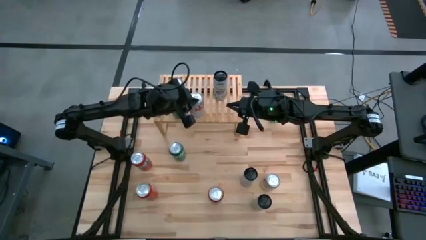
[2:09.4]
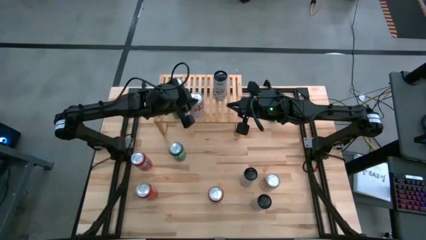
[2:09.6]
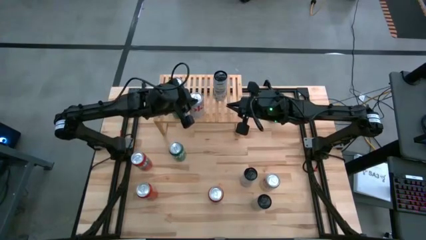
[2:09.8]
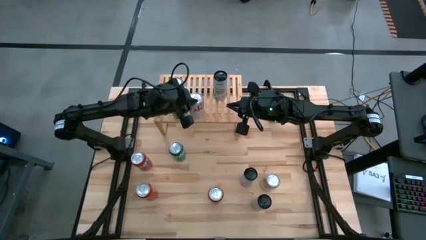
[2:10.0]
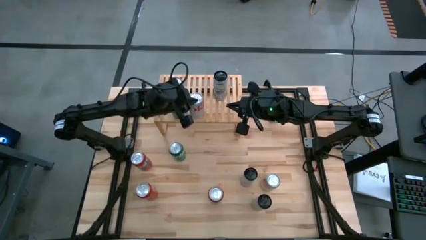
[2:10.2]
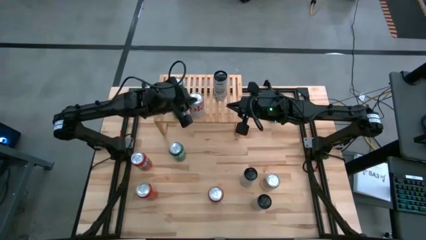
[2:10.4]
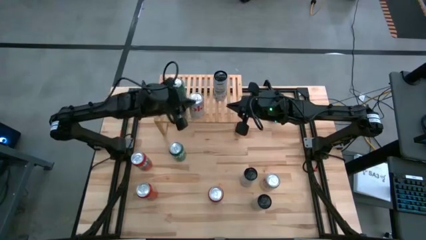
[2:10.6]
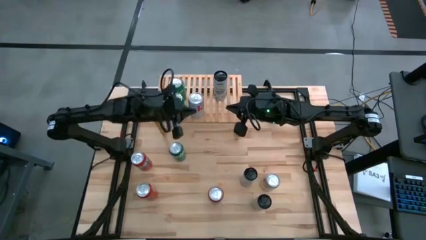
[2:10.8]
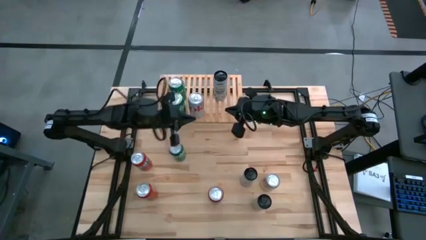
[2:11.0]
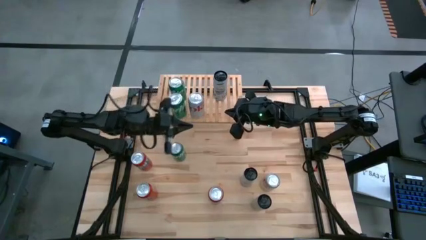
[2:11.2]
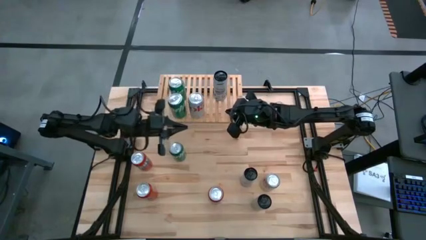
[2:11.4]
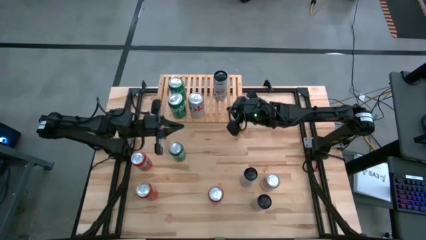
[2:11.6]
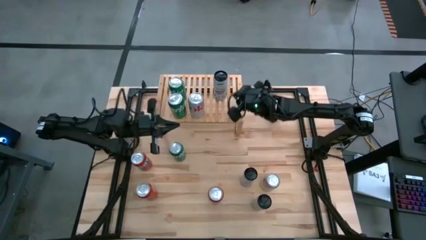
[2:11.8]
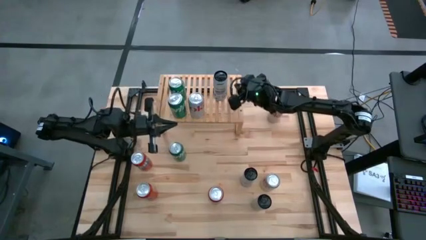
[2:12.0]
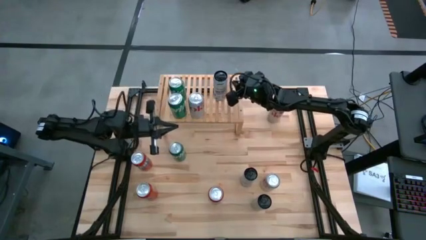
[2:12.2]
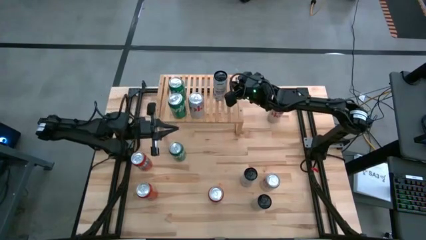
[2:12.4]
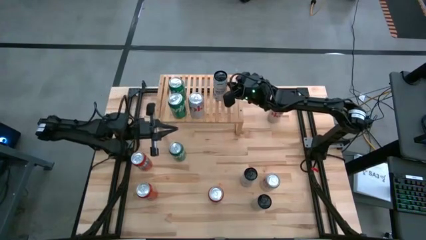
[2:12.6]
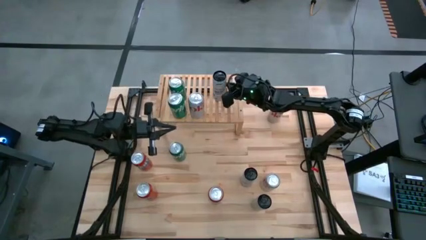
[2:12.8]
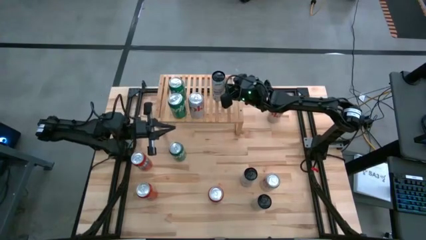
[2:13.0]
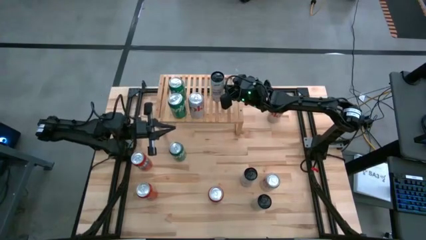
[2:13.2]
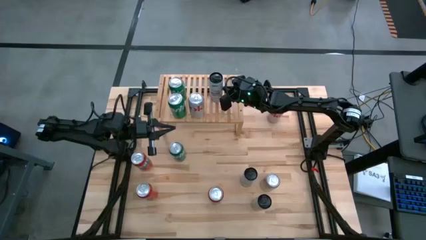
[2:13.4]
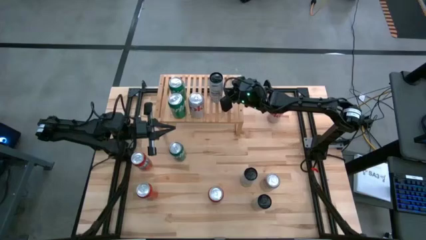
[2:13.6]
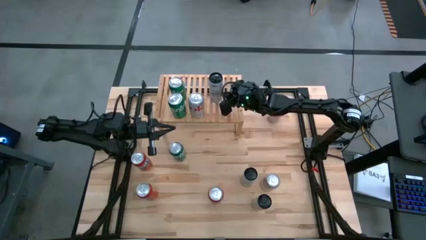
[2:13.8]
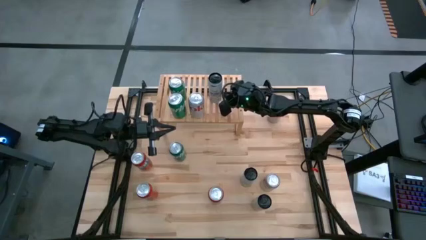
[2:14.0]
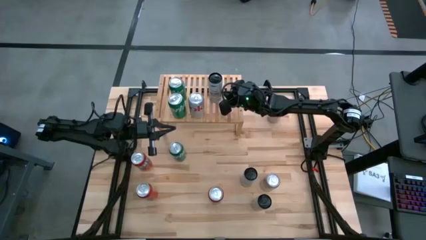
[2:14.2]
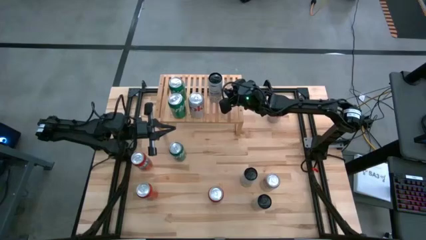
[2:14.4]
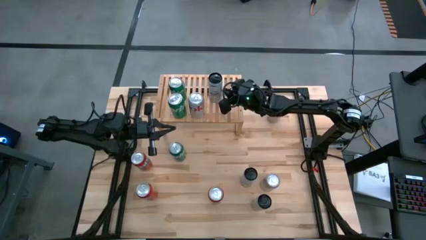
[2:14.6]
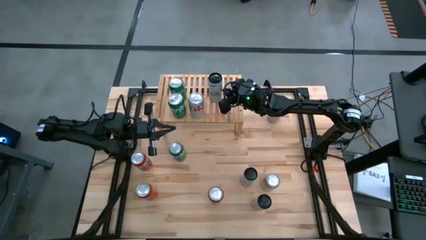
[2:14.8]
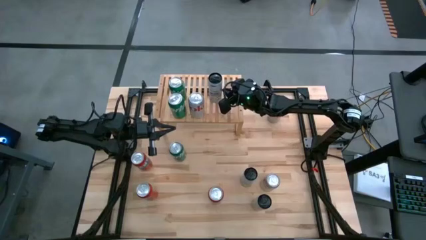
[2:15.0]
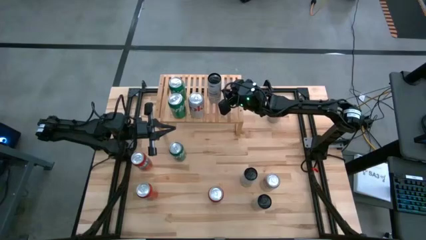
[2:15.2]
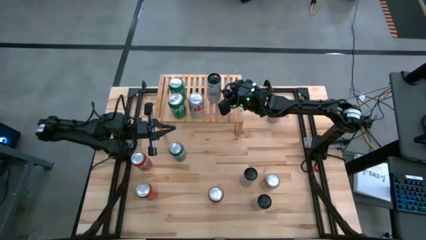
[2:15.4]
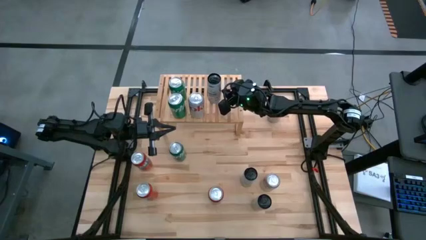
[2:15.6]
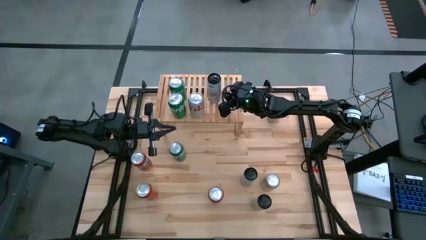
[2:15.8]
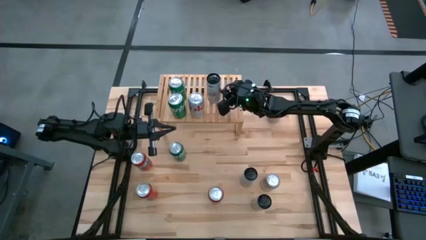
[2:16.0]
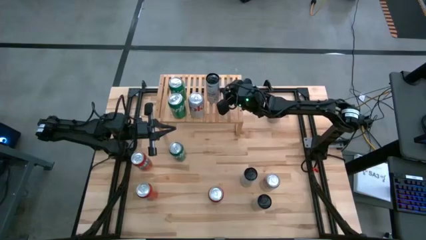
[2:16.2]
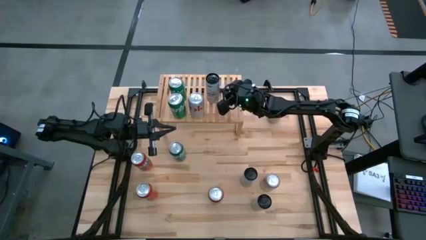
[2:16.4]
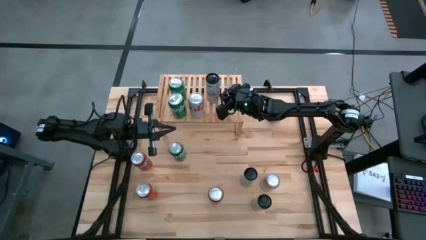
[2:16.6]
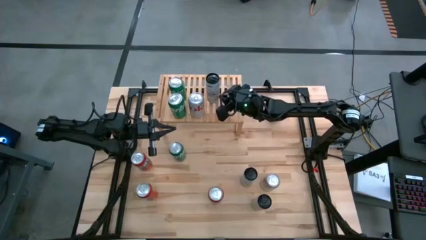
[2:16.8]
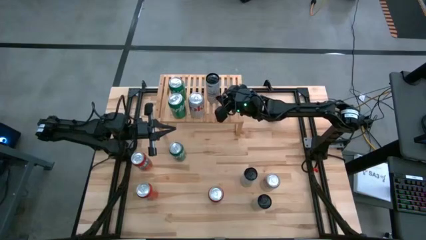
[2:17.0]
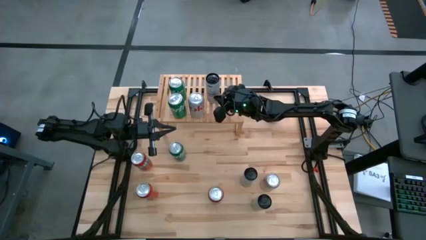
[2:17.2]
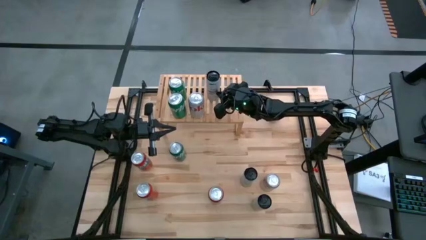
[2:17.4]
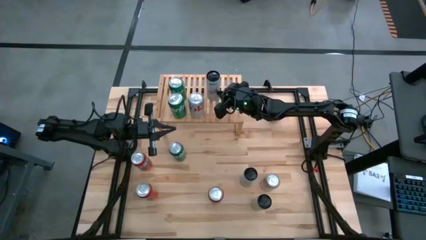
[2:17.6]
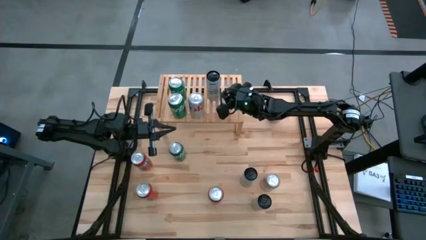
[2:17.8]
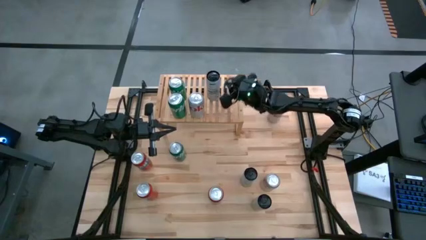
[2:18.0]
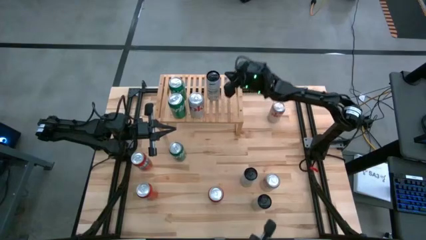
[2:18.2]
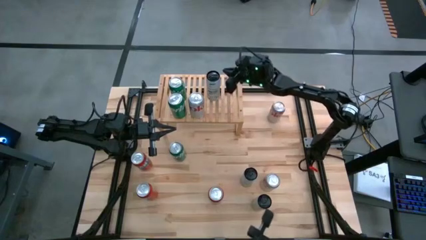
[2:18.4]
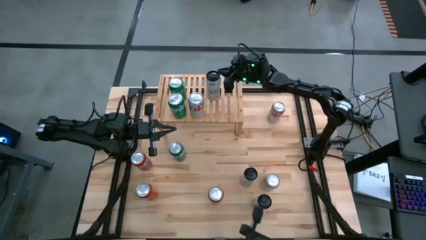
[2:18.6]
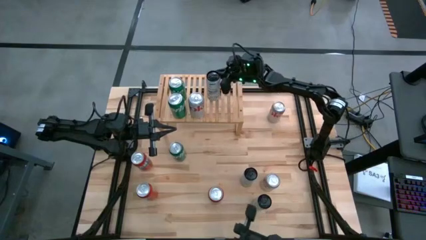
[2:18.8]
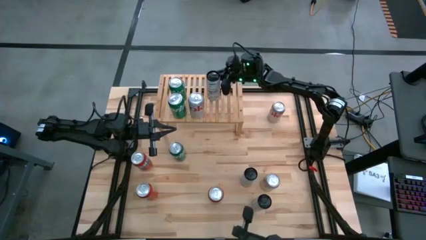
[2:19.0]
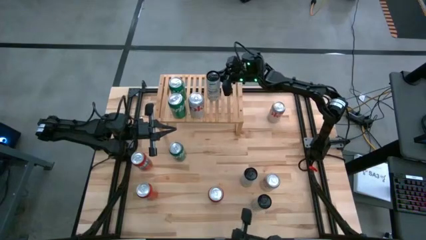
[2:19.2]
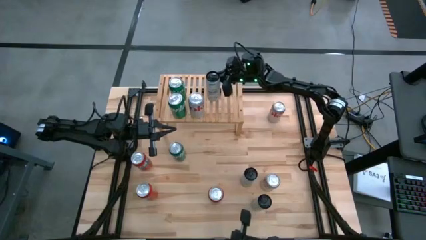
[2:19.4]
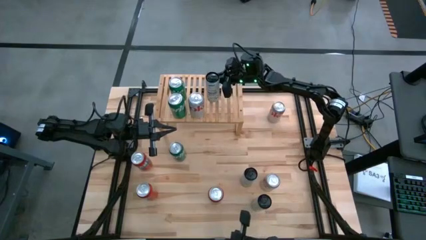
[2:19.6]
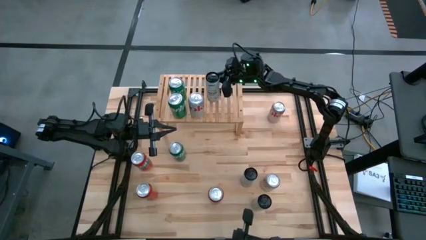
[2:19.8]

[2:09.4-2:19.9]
Task: Place canned beverage on shelf
Adjust the soda cans

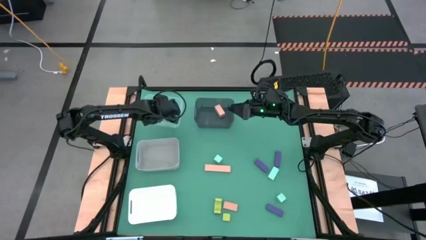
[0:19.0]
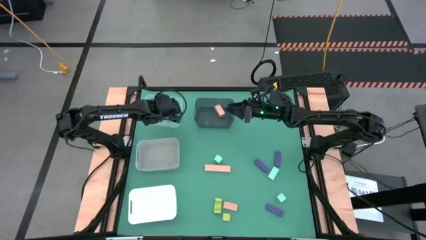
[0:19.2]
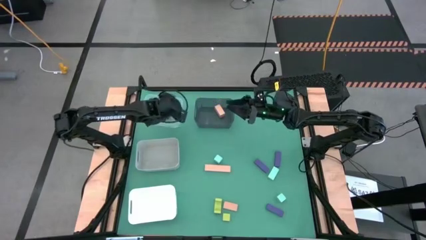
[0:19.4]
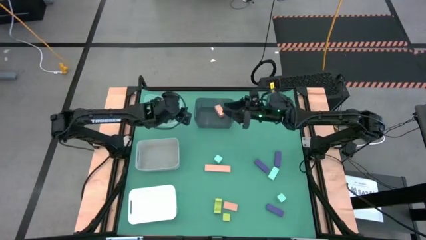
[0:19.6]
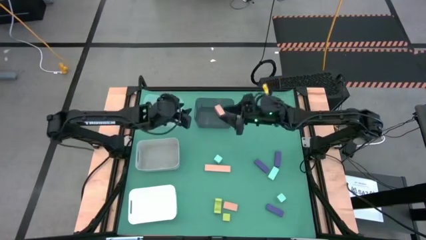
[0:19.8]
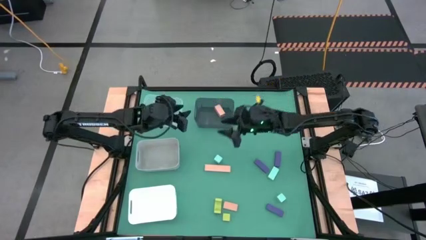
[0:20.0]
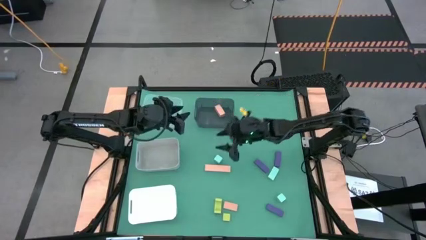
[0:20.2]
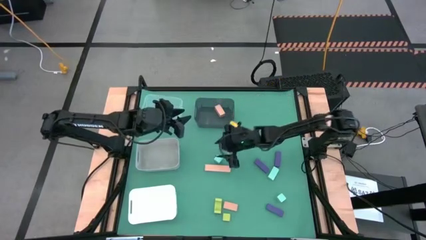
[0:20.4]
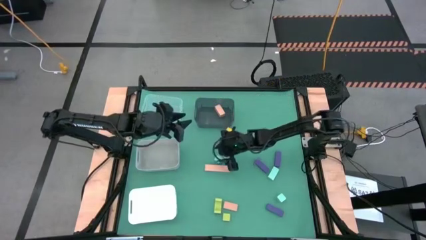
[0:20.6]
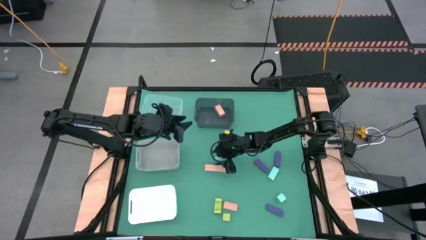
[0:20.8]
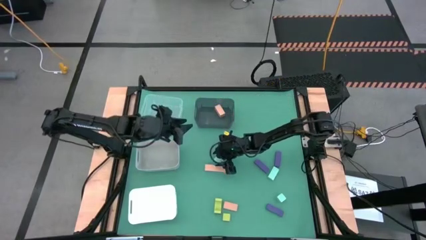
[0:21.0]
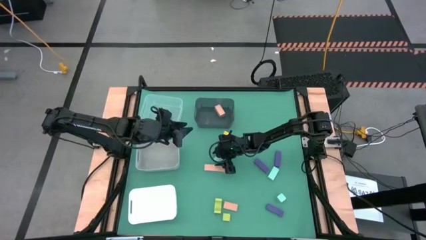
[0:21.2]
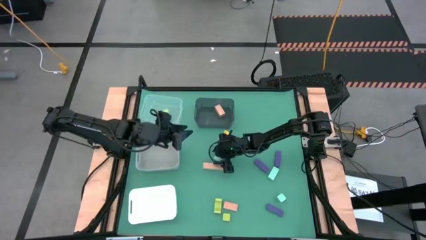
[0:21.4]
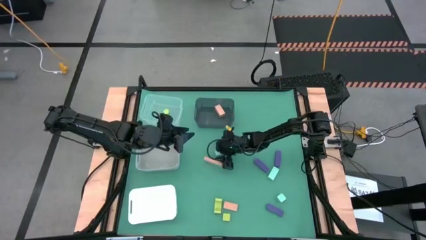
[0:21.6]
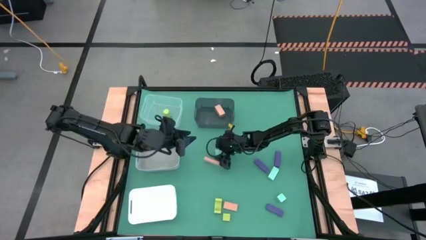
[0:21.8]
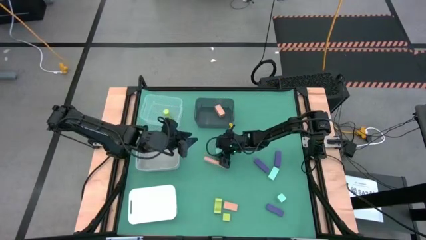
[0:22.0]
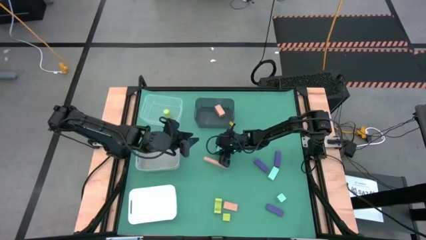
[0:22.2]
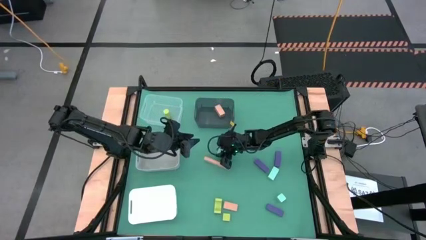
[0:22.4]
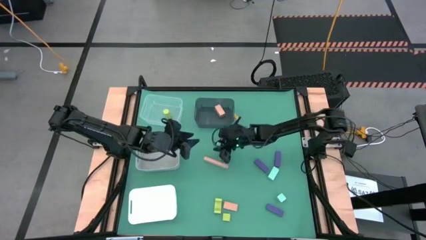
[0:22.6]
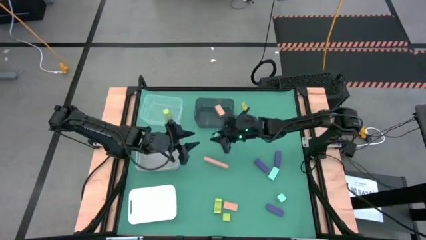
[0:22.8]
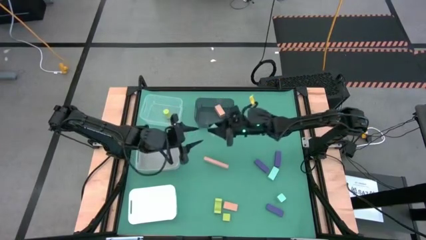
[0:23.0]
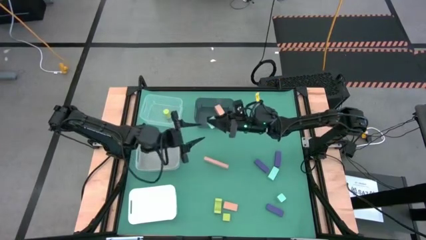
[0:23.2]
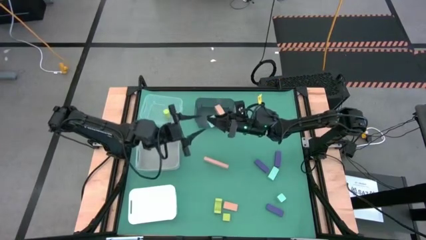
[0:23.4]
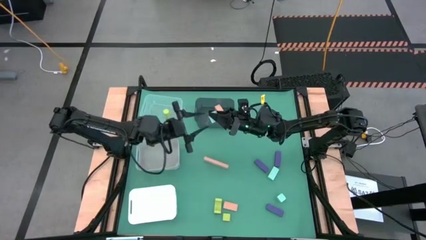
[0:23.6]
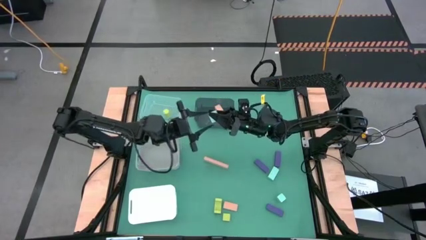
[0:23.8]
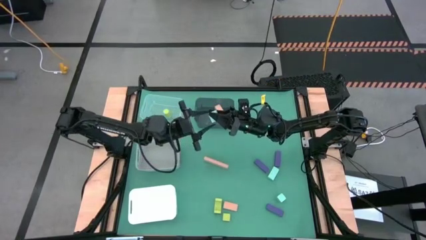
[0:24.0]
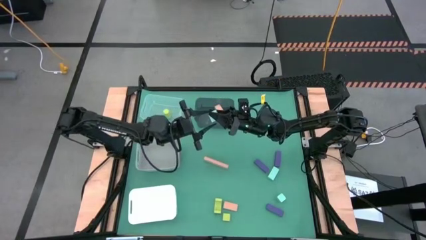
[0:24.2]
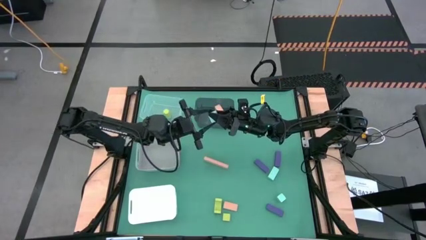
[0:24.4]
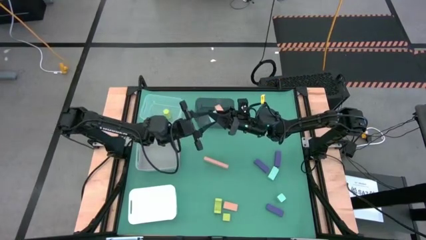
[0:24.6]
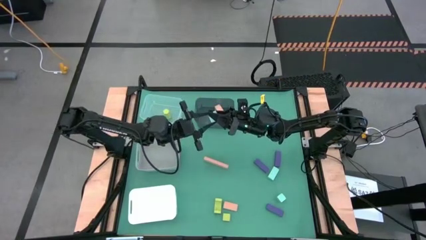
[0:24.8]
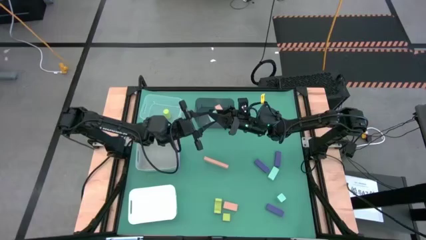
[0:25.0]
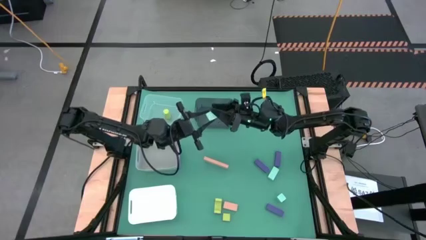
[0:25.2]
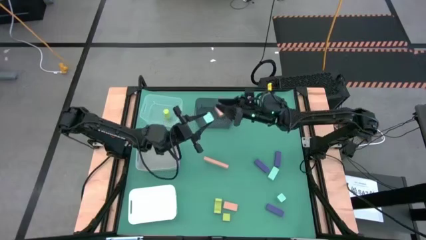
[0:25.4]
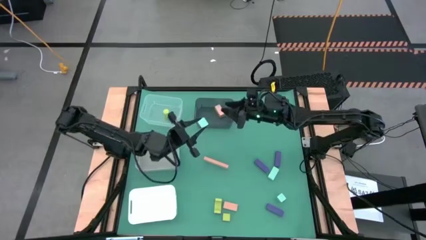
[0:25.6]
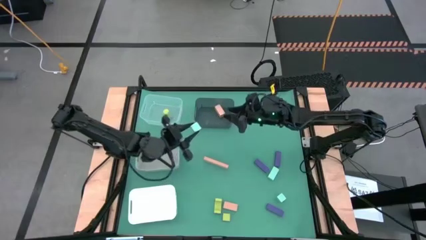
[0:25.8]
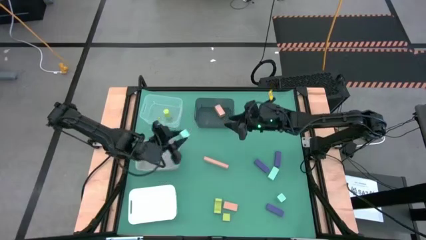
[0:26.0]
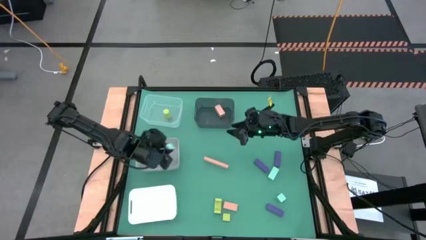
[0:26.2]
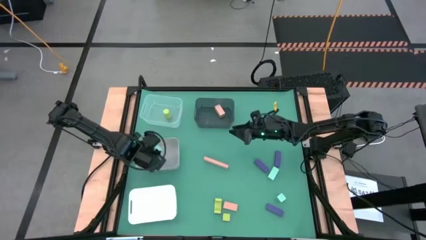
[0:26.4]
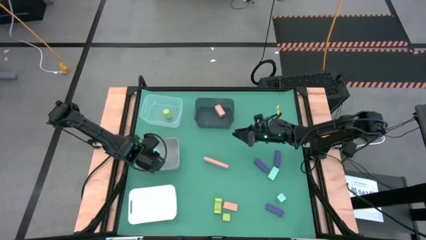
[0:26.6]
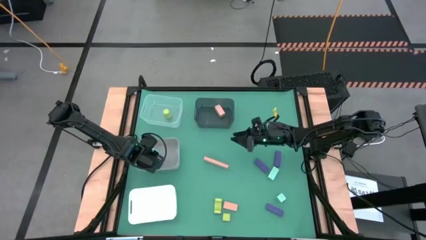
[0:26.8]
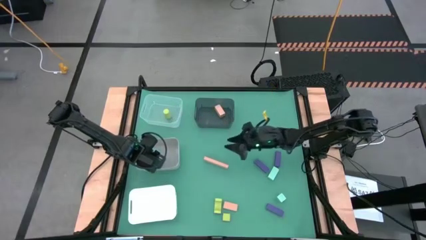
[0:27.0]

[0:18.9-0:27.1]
Task: Sort & place blocks by color
Put the left blue block into the dark white bin
